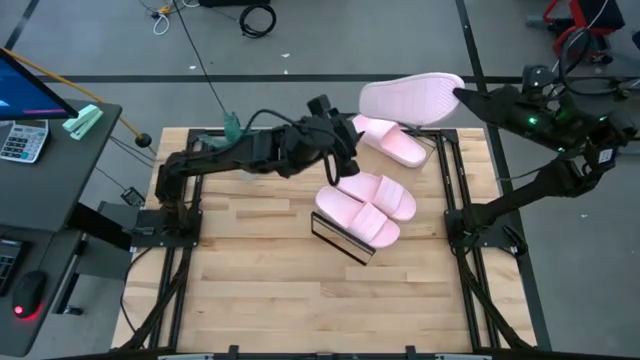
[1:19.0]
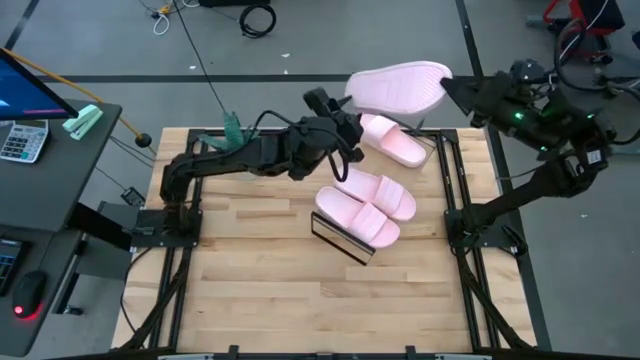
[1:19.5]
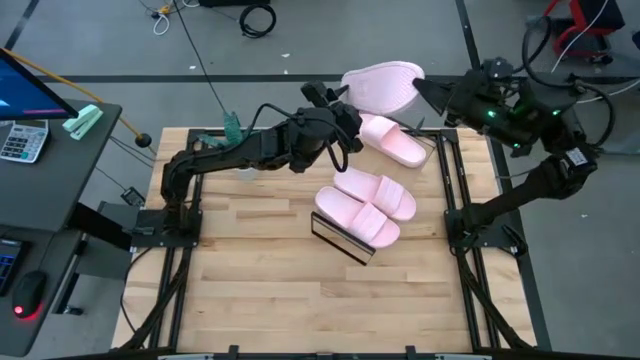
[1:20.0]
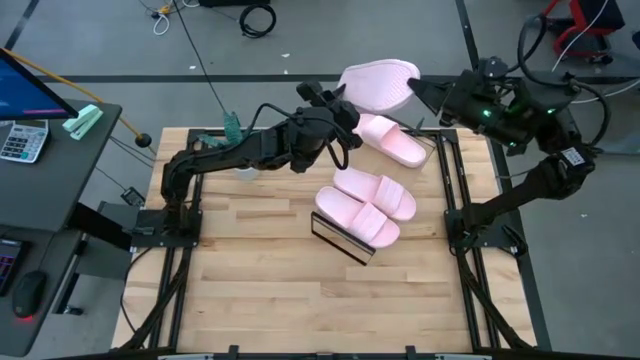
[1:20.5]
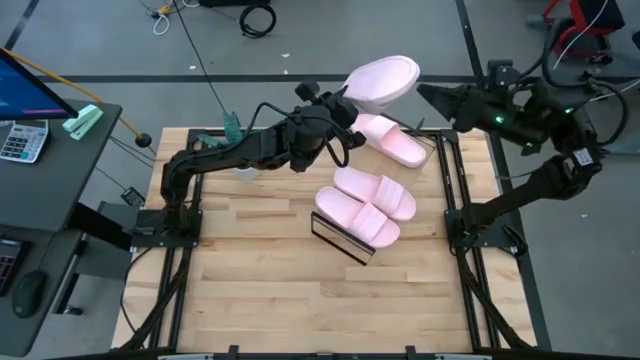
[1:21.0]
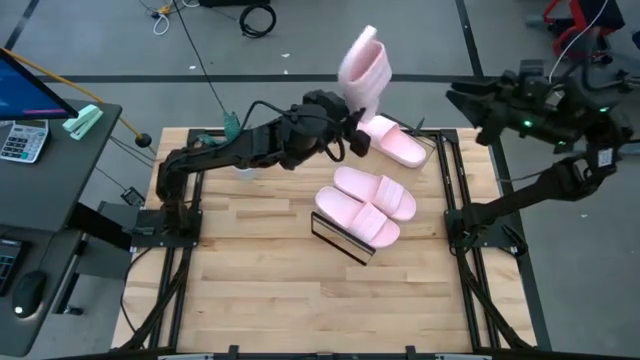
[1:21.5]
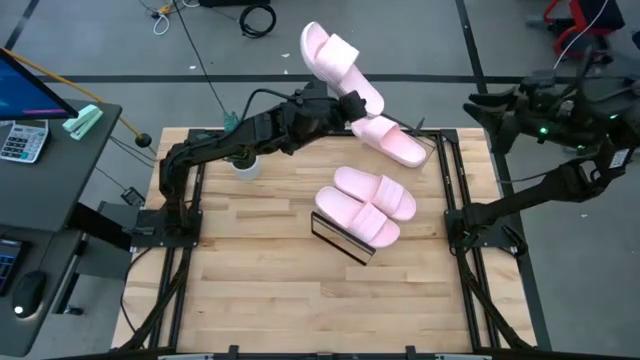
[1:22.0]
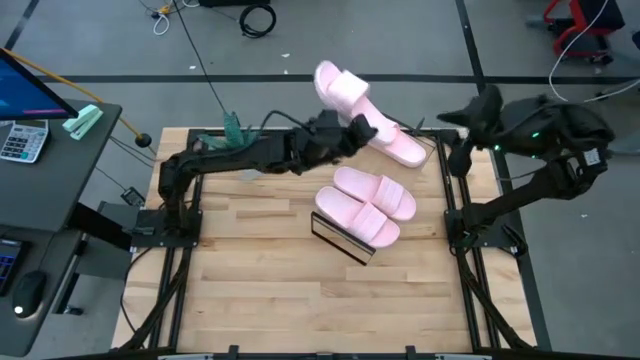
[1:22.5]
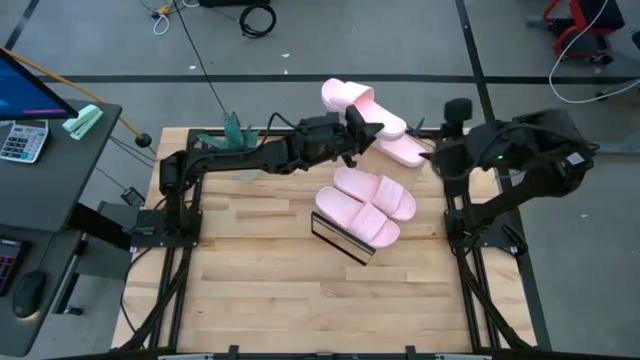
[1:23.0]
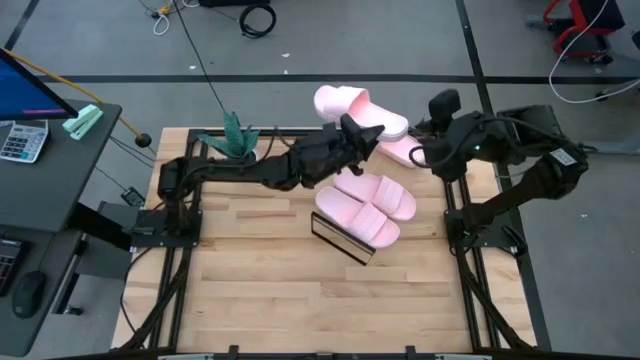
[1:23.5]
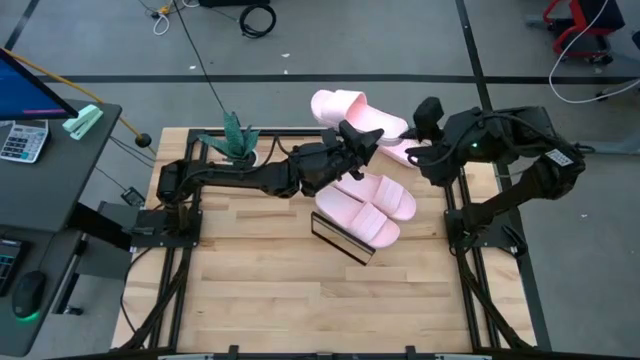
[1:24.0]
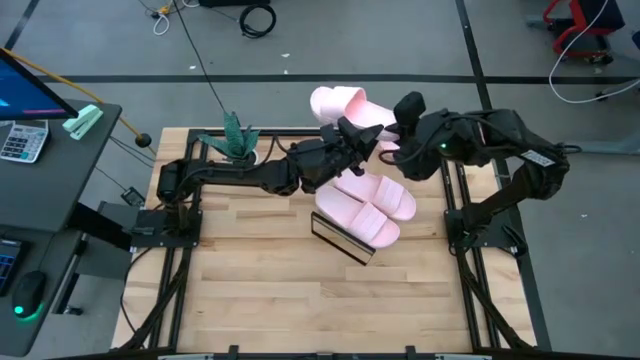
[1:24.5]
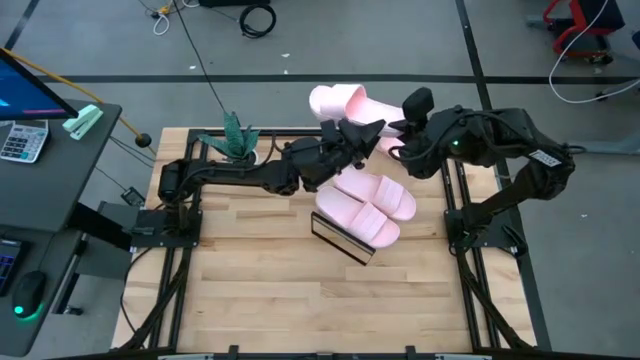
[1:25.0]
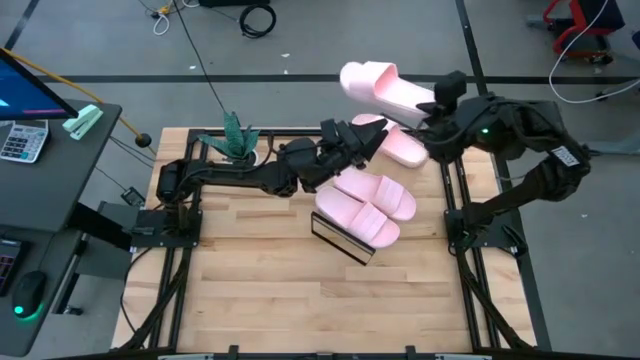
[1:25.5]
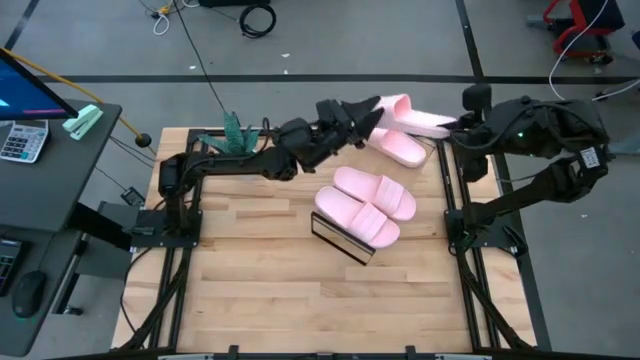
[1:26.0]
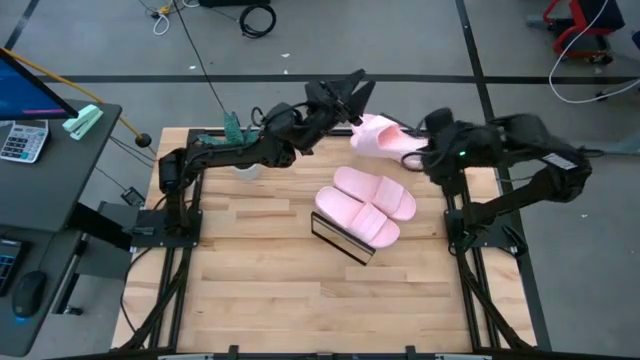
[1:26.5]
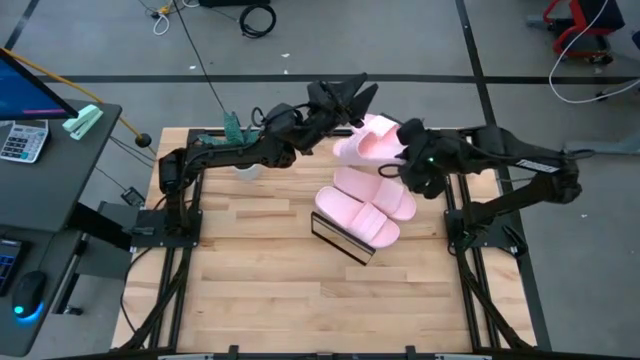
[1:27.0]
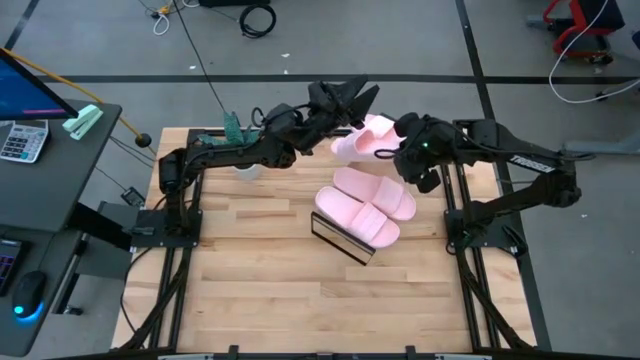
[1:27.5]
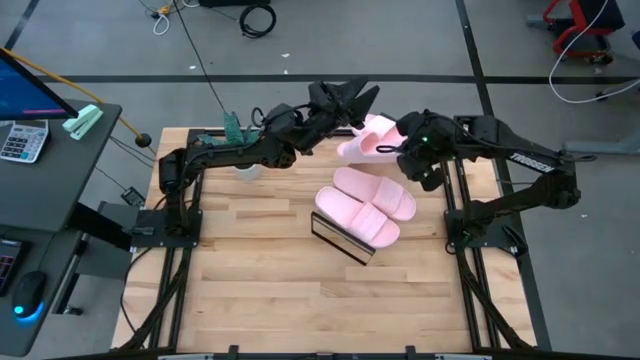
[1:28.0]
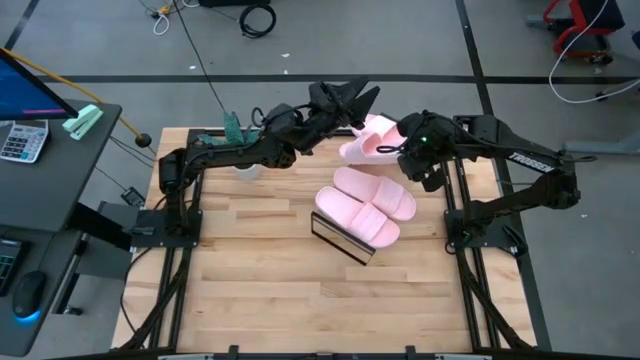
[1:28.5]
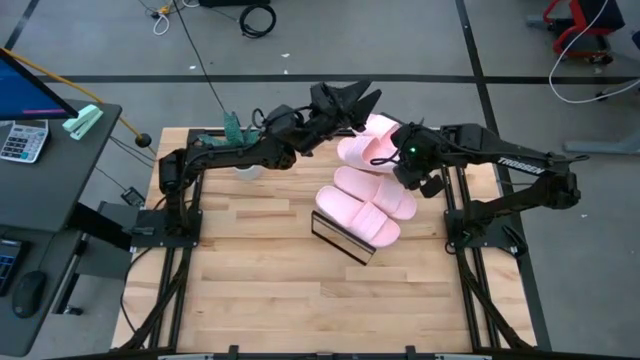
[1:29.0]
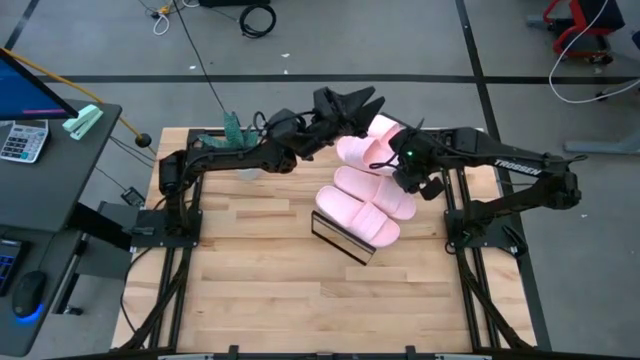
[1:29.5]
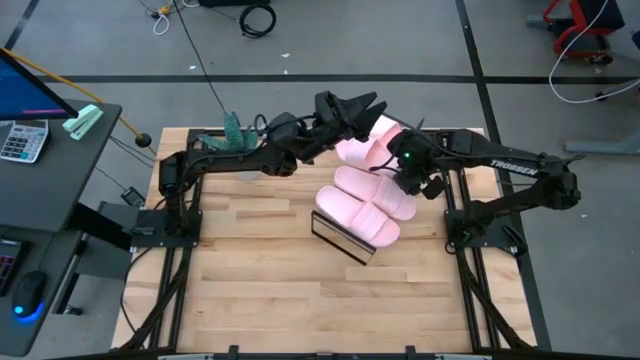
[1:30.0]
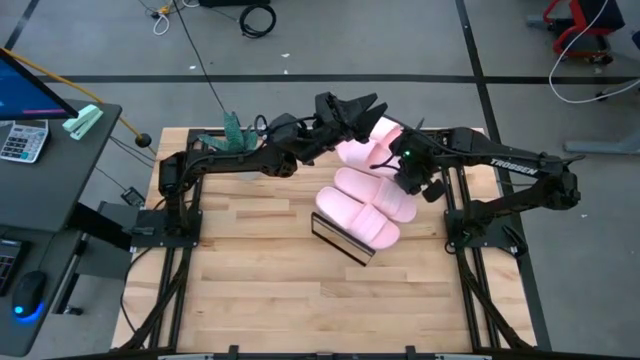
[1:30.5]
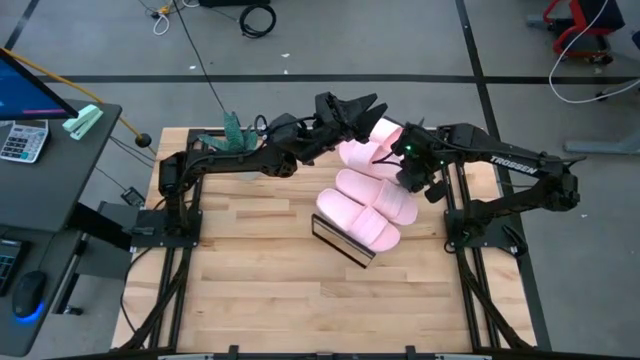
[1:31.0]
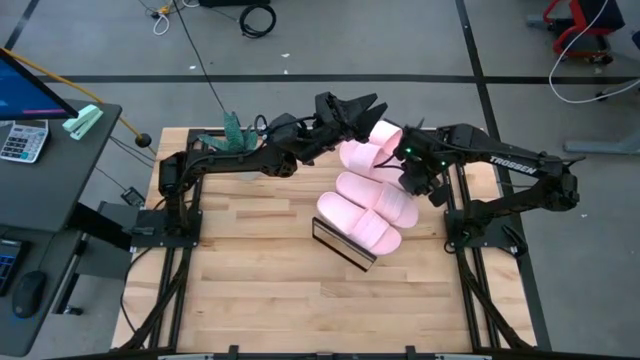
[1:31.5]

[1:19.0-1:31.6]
Task: Pick and place slides into the shelf
Put the pink slide on the shelf

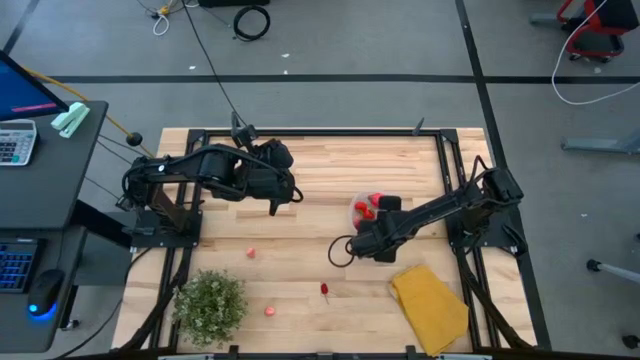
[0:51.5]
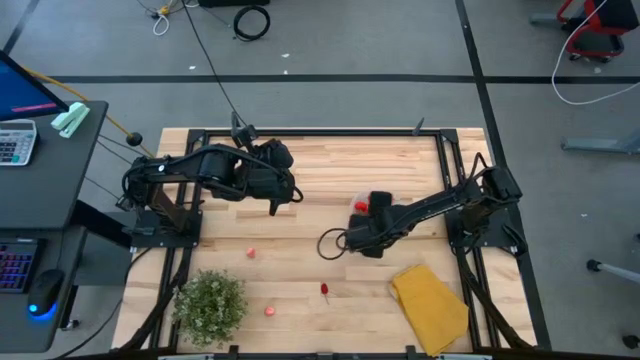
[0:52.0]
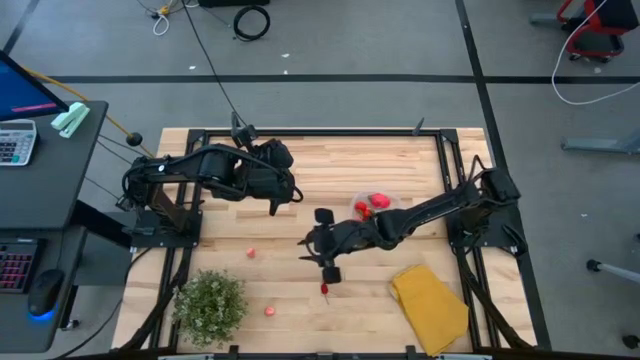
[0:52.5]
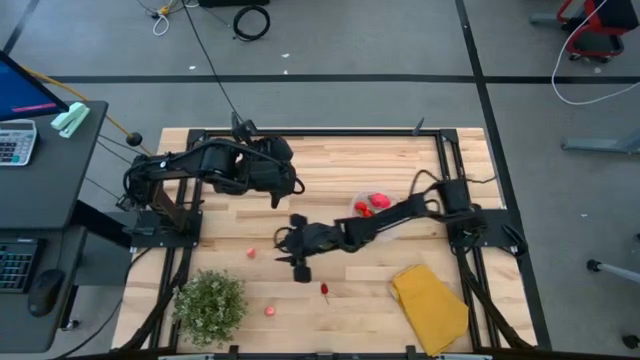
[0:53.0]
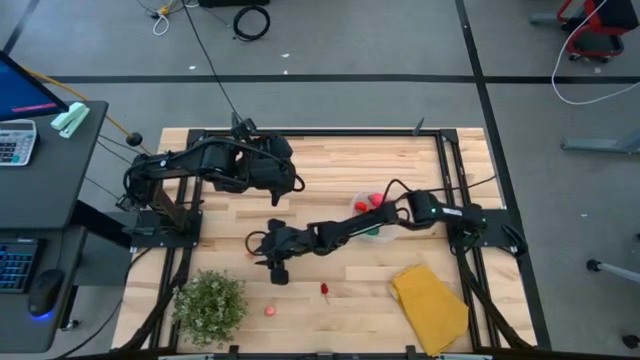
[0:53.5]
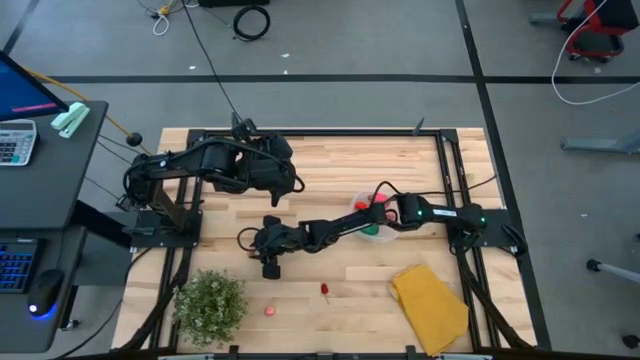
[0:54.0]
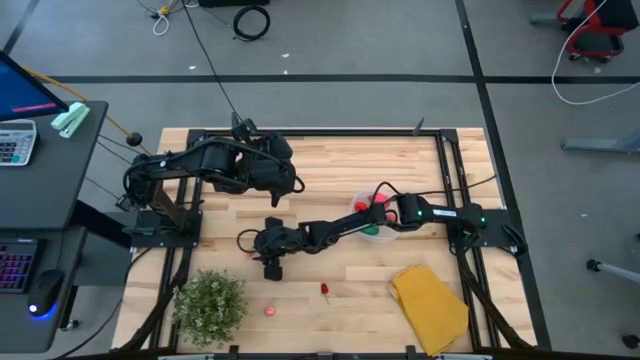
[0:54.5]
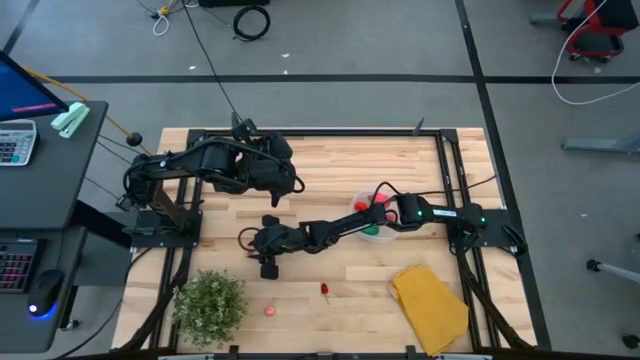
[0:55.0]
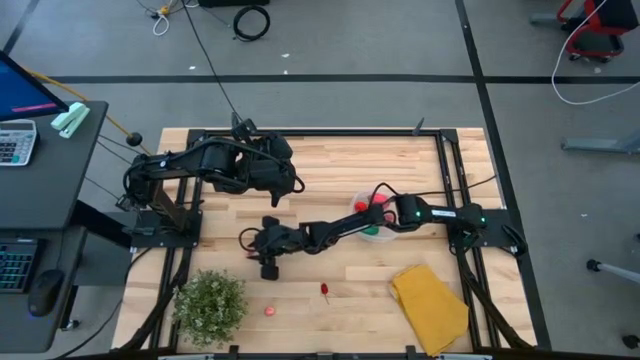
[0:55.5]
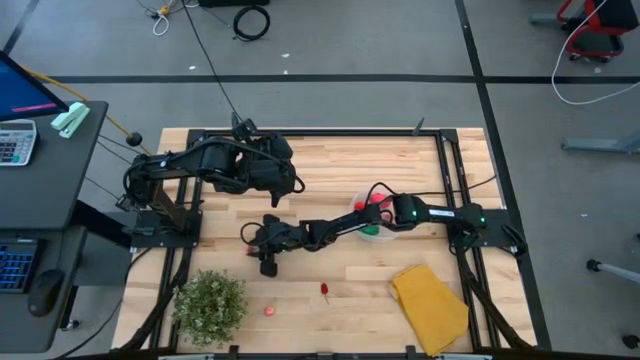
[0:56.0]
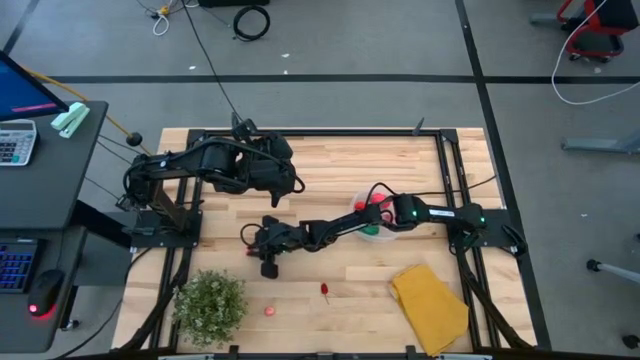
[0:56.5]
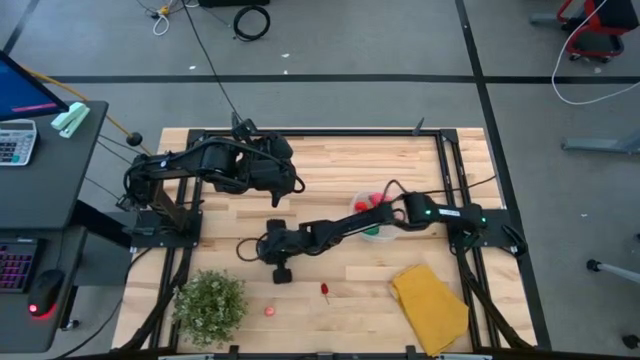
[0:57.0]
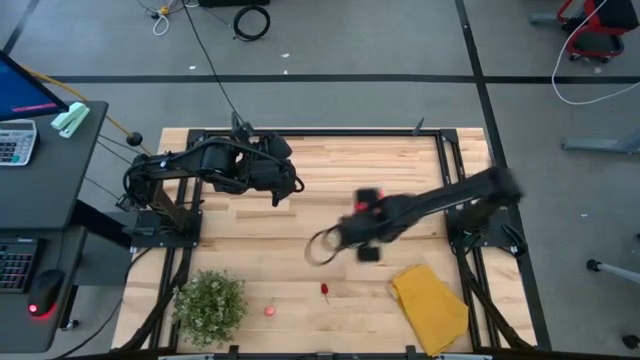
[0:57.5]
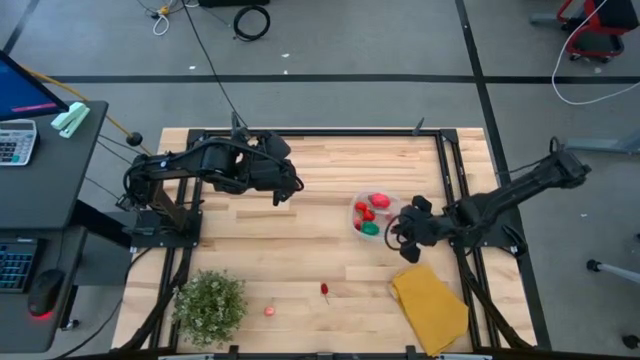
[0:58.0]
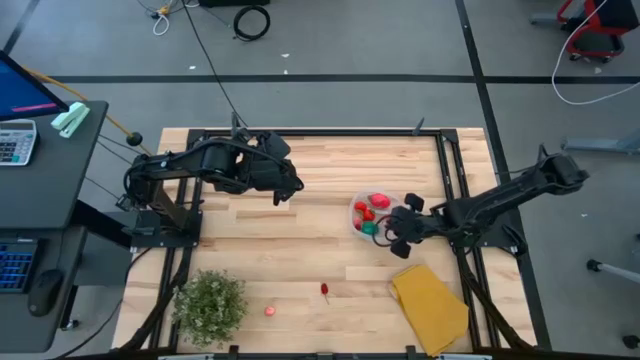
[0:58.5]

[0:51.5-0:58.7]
Task: Pick and placing Produce into tupperware
Put the pink peach into the transparent container

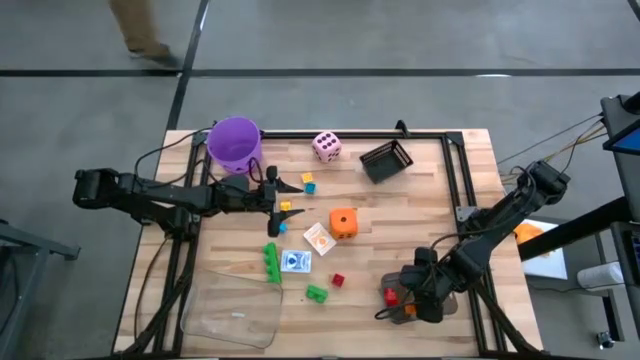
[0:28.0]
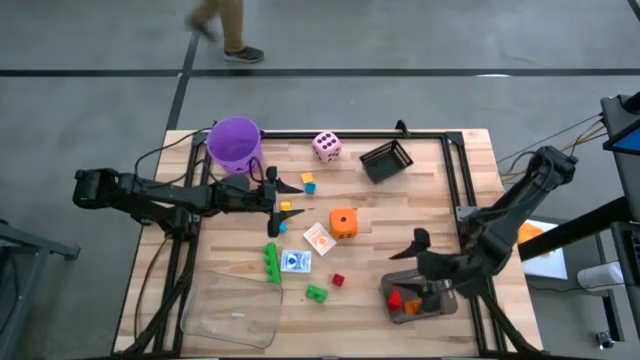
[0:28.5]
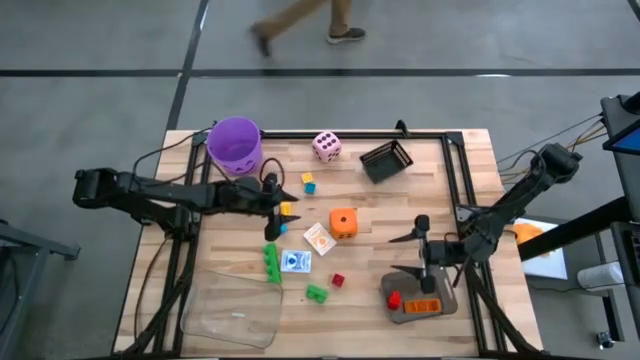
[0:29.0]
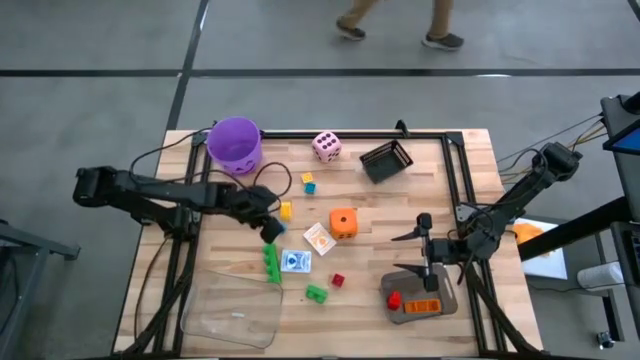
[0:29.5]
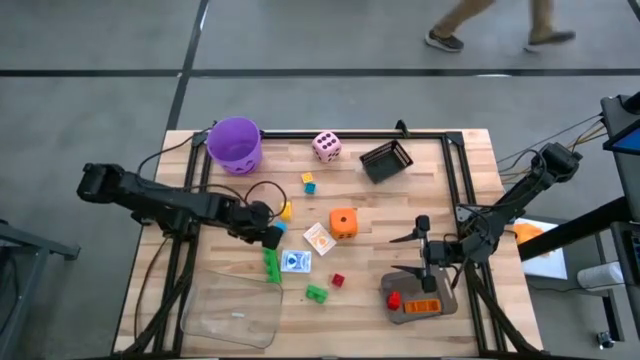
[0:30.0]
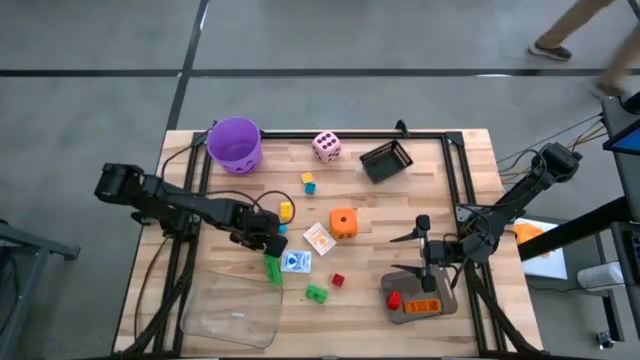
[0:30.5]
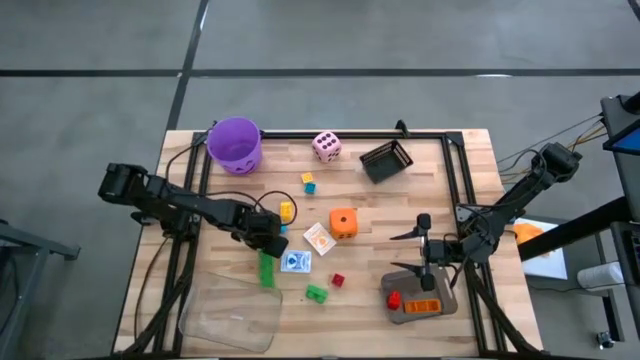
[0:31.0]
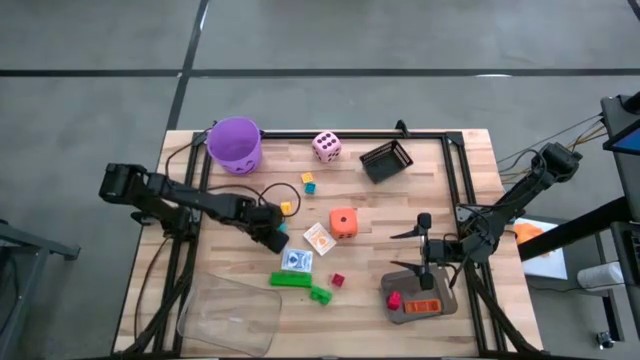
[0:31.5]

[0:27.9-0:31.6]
Task: Pick & Place Toys
Put the green game piece into the black bin
